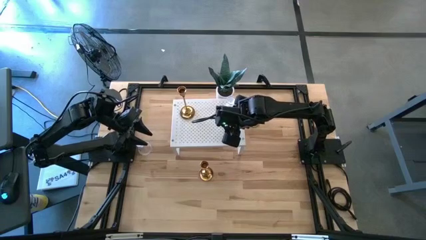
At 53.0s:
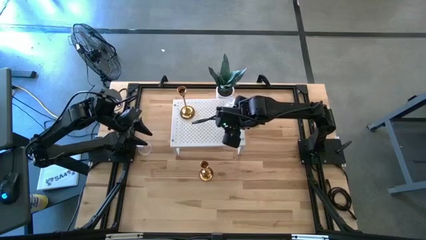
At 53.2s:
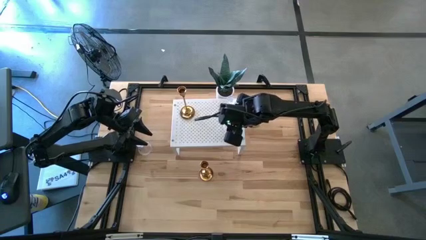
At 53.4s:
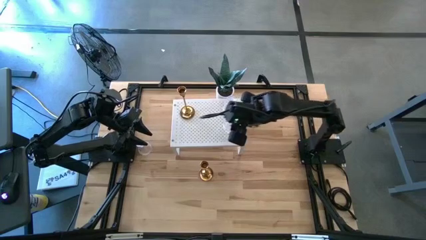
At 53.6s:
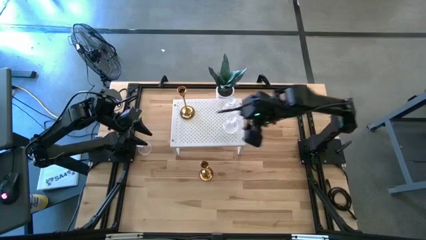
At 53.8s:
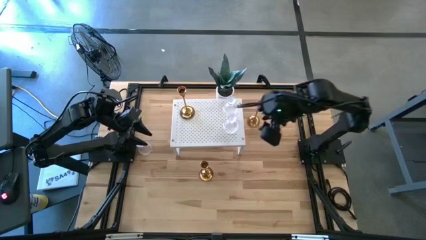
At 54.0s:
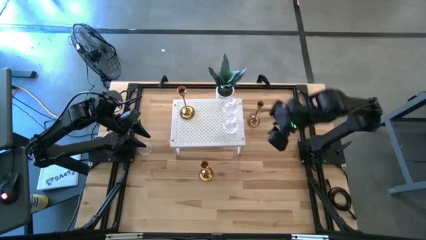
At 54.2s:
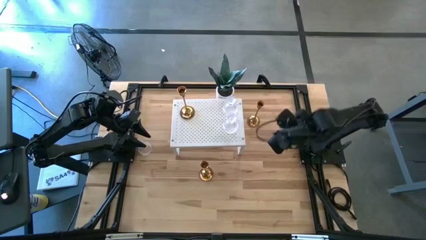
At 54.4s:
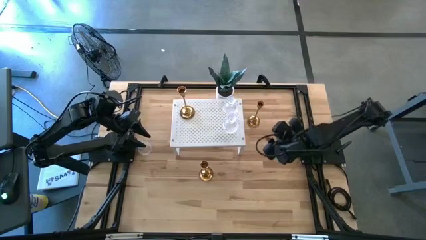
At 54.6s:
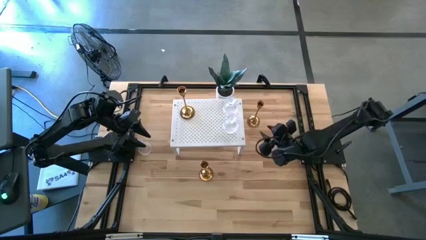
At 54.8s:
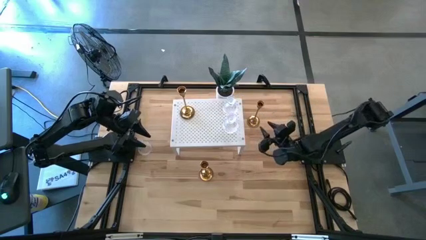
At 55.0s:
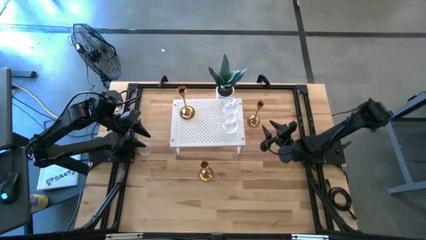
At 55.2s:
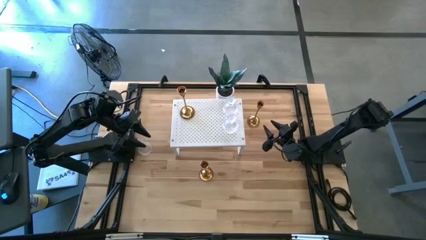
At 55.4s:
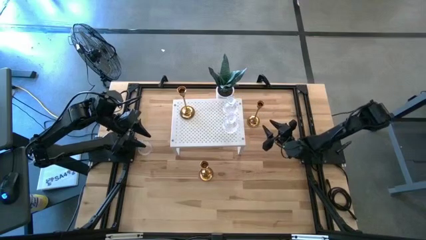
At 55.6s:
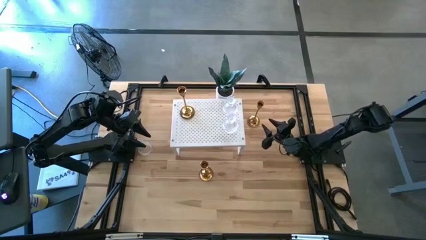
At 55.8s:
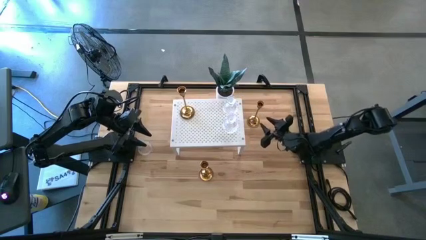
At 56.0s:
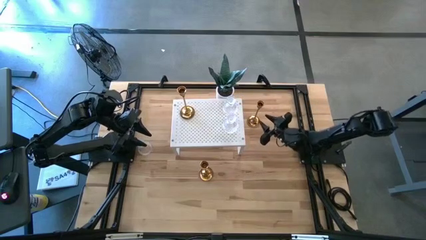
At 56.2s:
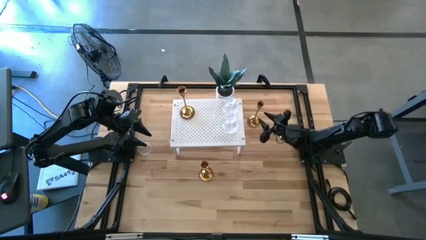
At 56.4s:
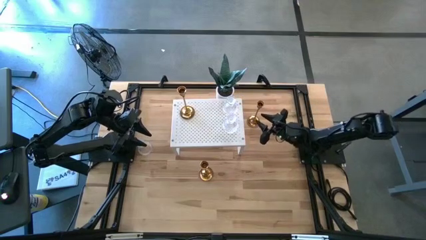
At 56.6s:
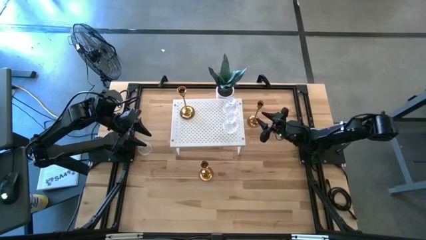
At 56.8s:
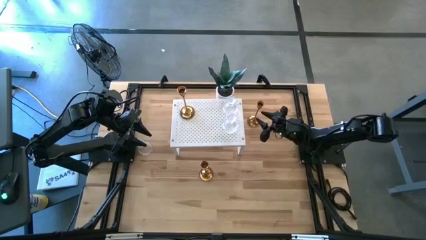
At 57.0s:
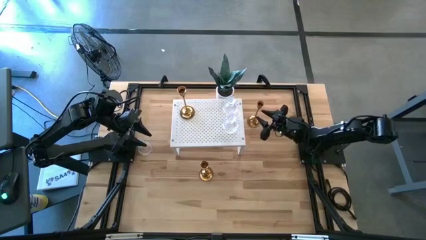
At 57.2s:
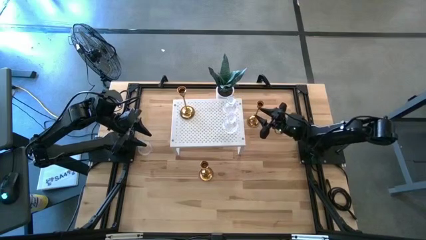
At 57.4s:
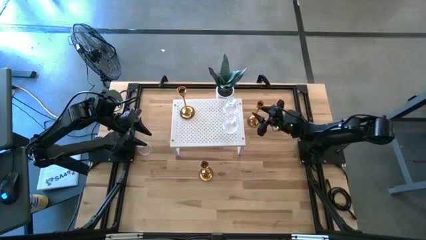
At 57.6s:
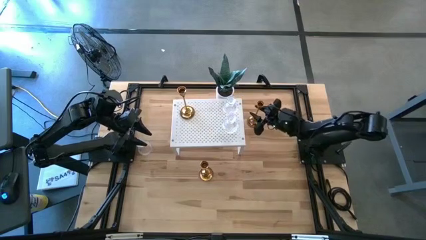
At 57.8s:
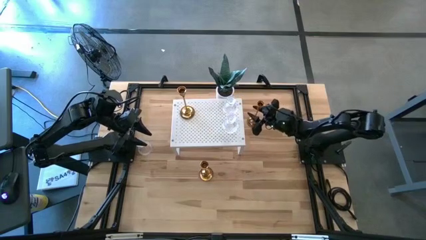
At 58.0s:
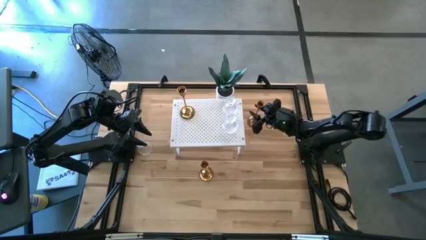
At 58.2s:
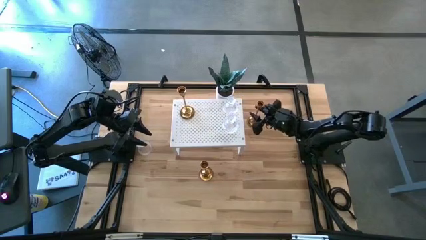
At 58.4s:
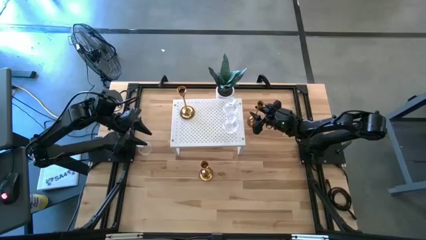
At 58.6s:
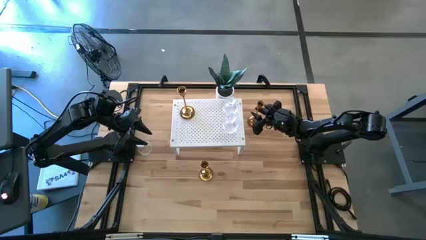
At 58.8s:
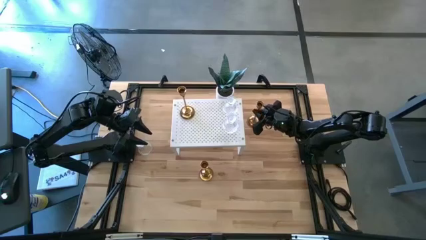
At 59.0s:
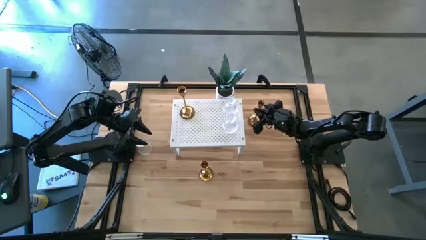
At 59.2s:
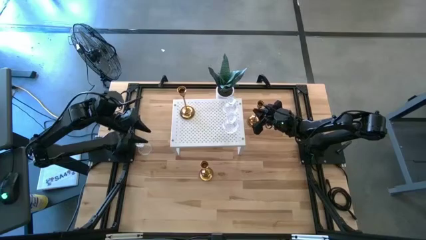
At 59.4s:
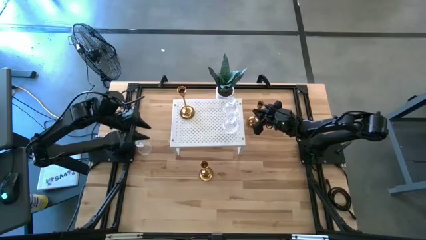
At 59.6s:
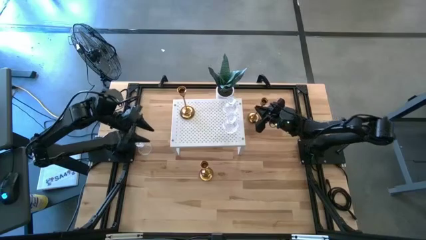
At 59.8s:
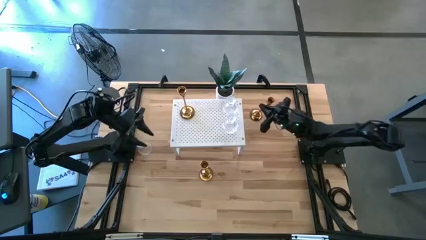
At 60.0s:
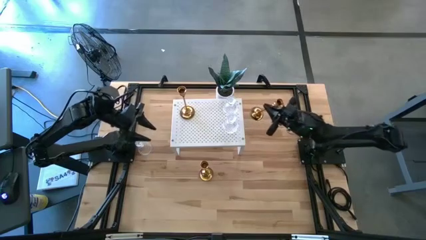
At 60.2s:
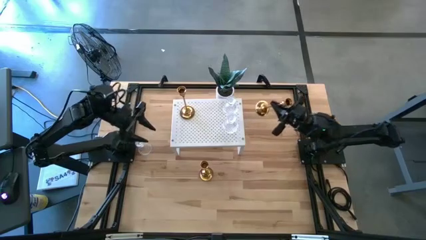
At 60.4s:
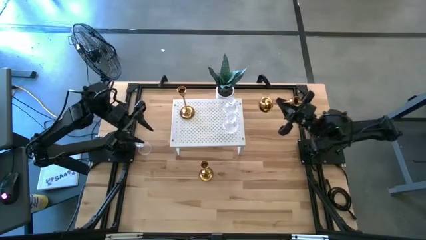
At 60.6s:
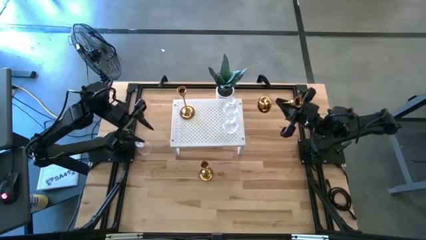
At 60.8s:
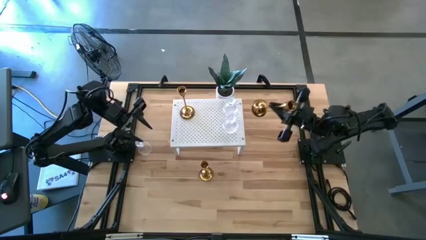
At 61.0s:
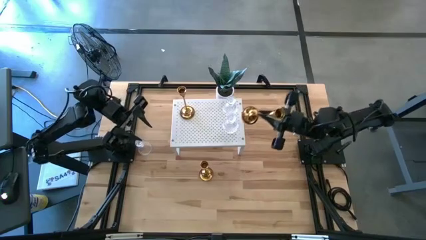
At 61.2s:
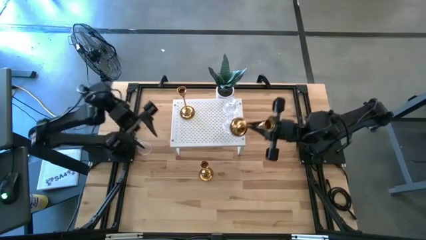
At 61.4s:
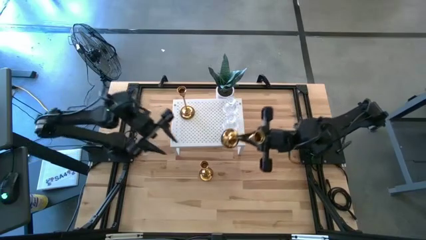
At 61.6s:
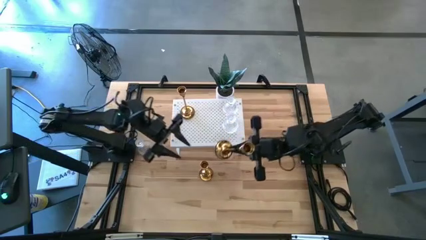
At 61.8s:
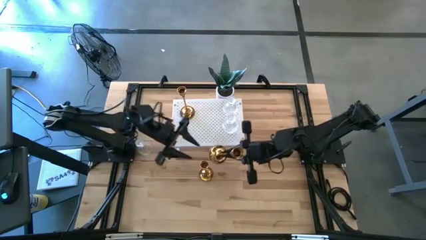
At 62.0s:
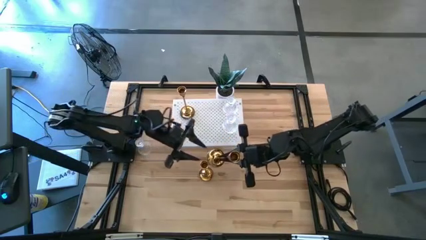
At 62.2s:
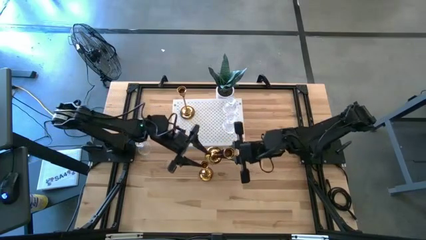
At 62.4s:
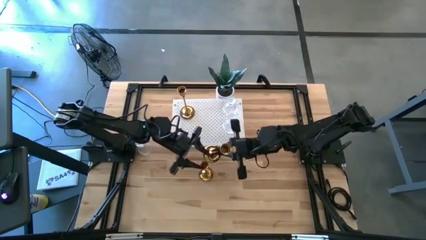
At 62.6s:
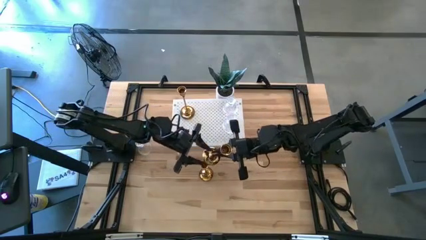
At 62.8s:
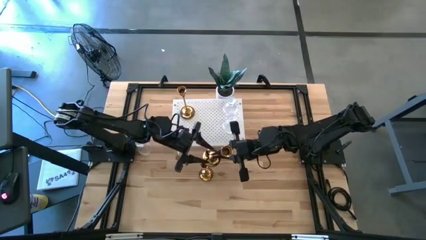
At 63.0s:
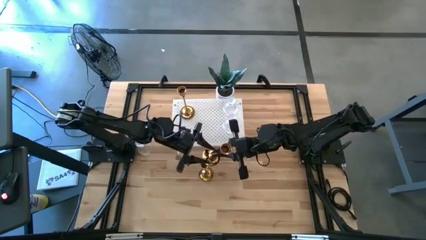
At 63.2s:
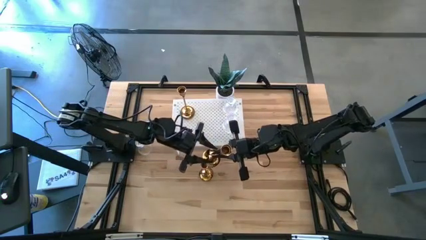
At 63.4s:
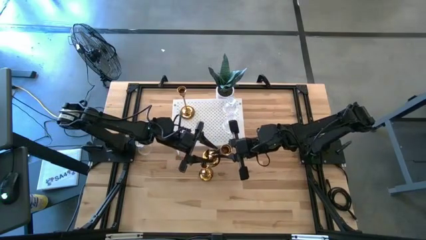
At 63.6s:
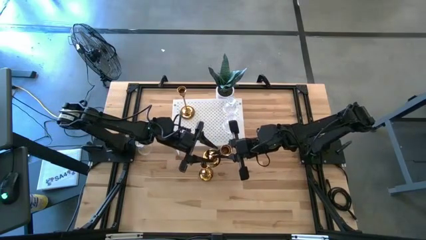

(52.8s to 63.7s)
Task: Pick & Place candle stick holders
Put the top gold candle holder on the shelf aligned with the other gold candle holder
